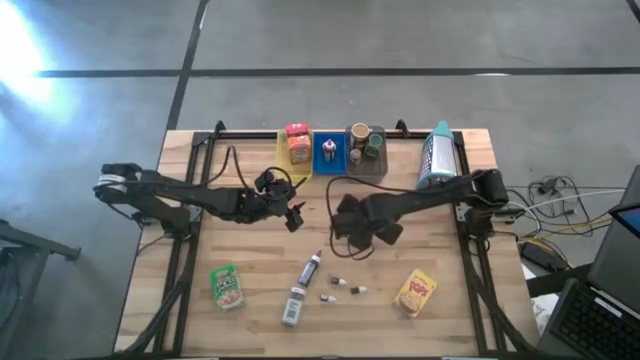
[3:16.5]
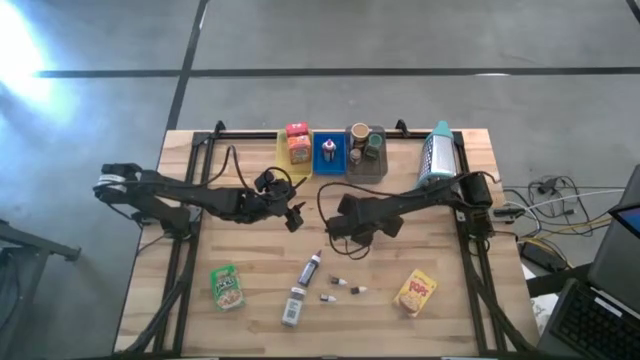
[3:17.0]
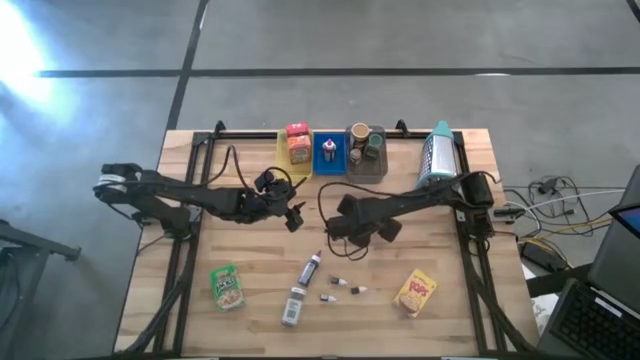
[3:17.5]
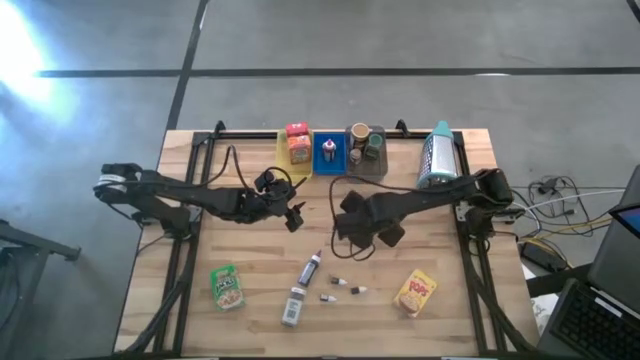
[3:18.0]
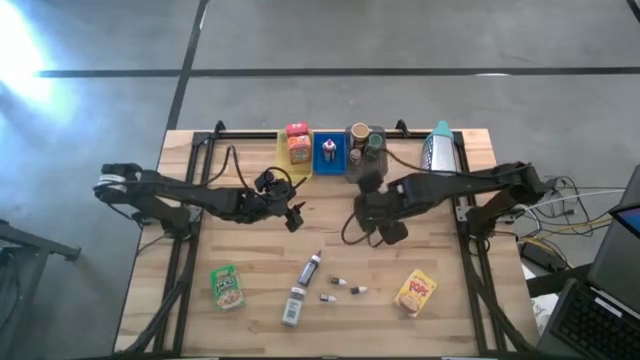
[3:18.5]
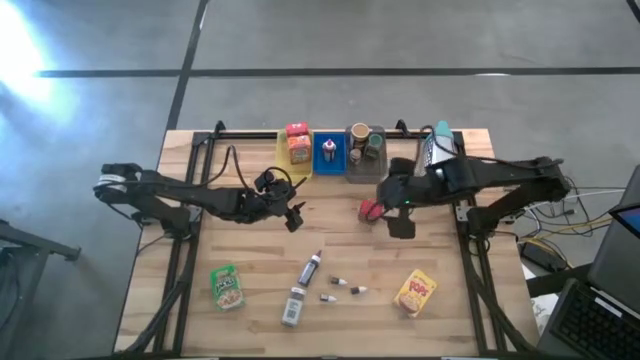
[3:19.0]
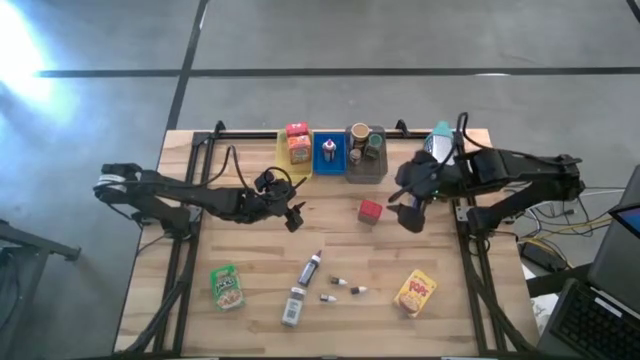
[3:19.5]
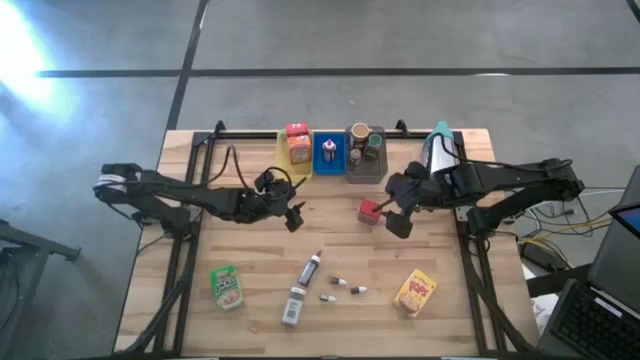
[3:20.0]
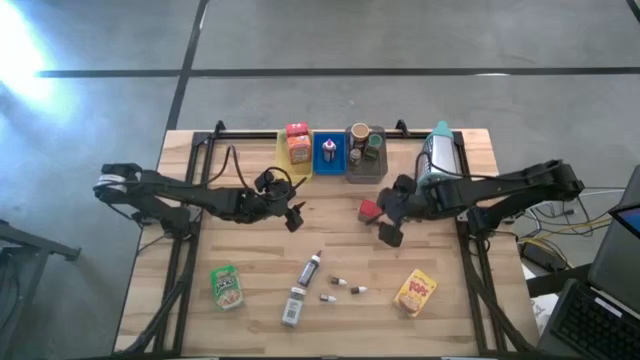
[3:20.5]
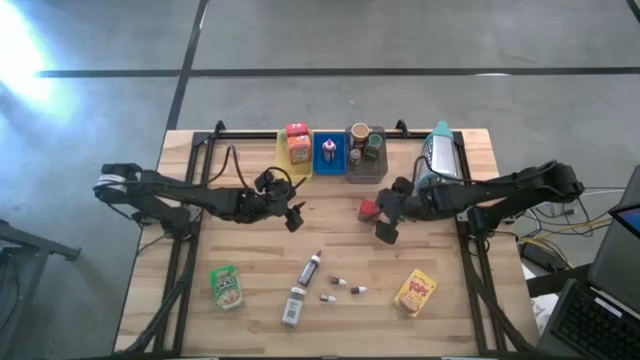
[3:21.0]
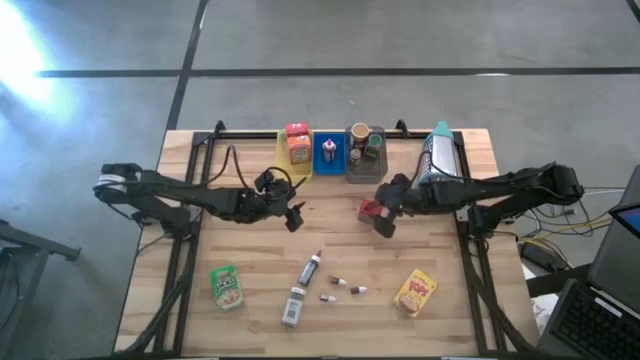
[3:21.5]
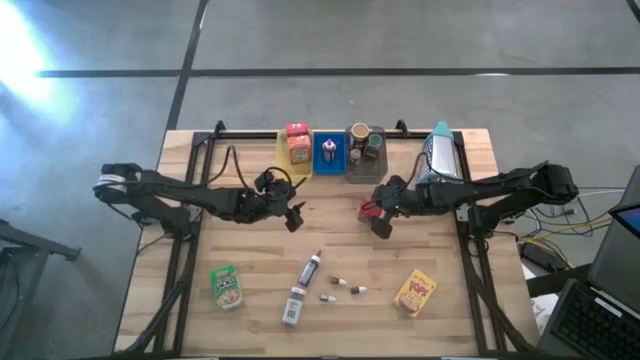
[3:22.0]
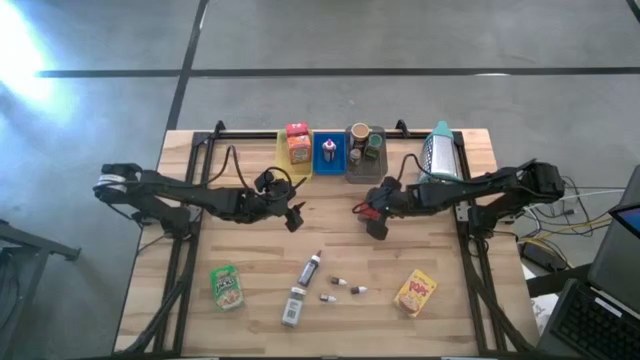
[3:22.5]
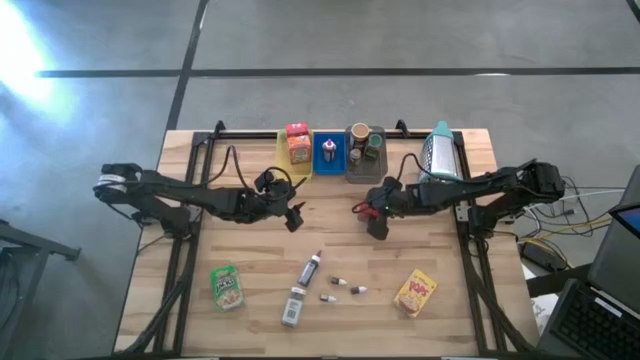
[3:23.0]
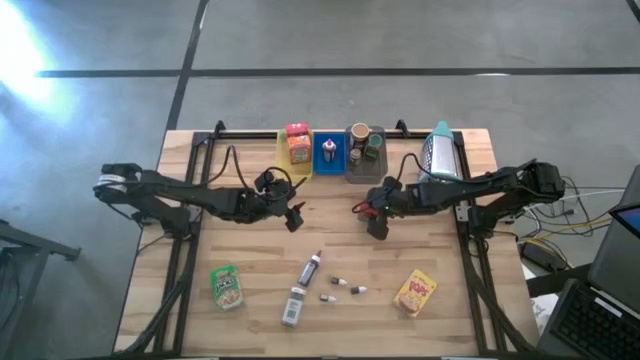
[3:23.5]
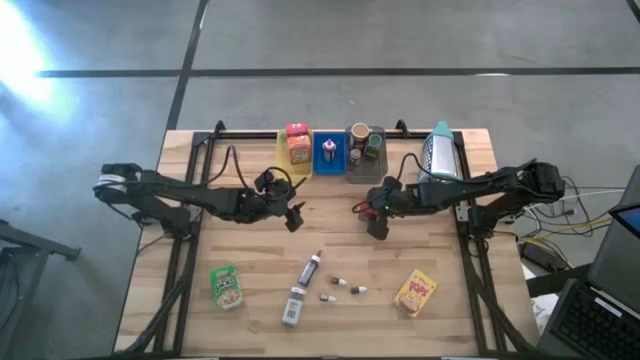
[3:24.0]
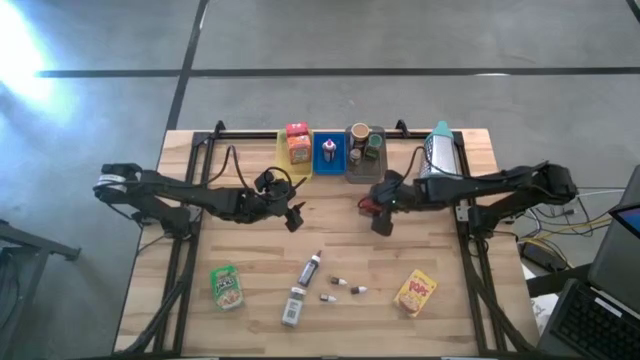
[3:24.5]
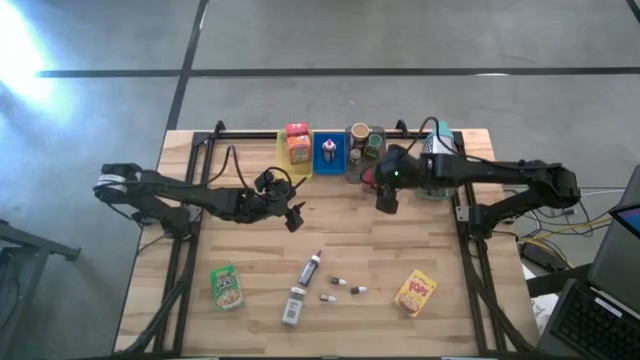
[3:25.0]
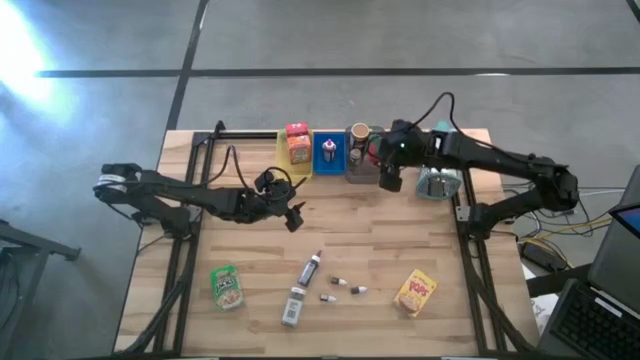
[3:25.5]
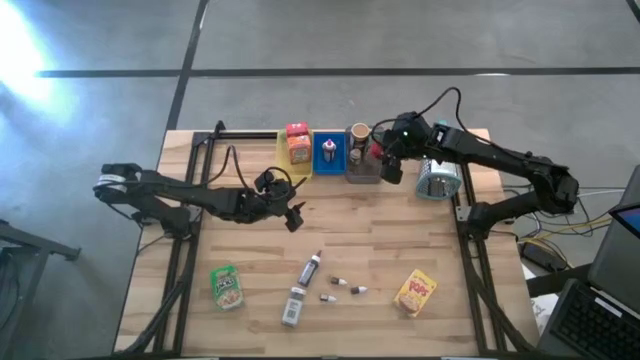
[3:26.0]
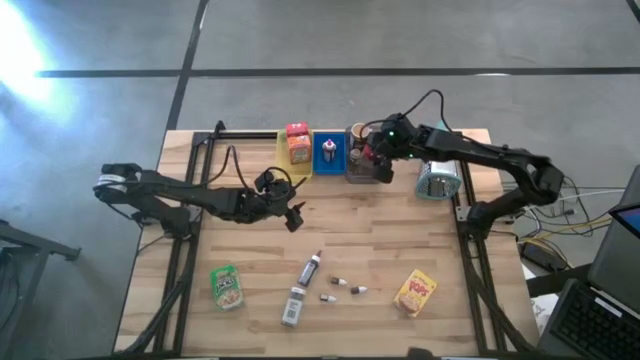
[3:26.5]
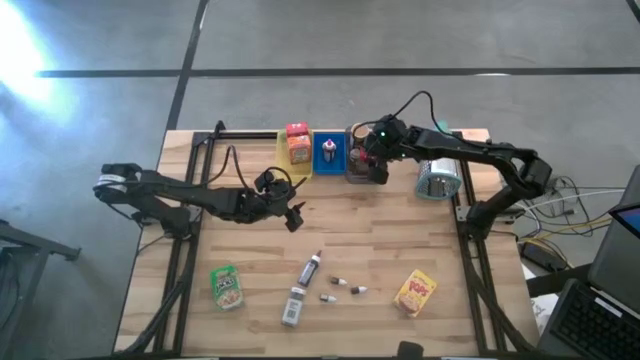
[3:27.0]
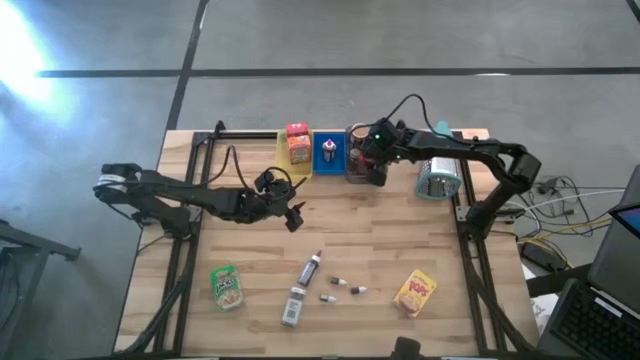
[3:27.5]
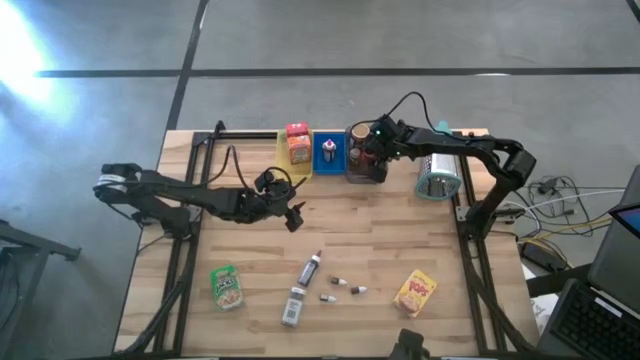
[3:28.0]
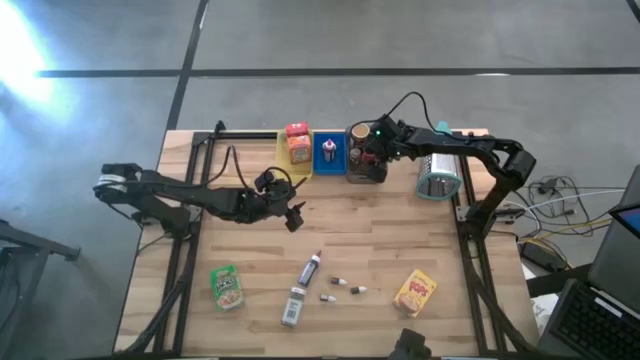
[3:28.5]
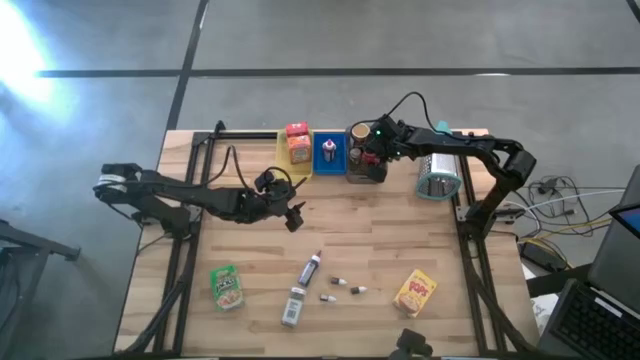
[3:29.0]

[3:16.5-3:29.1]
Task: Pick & Place Kitchen Items
Put the red seasoning can into the black bin

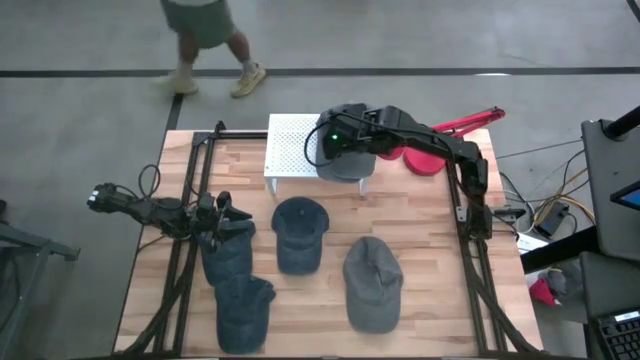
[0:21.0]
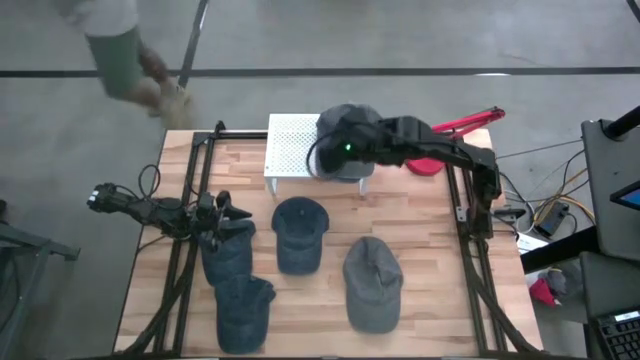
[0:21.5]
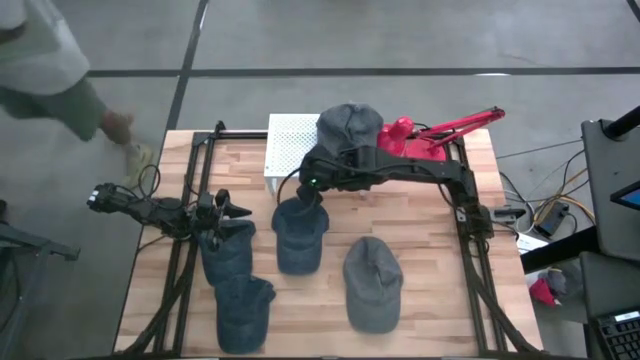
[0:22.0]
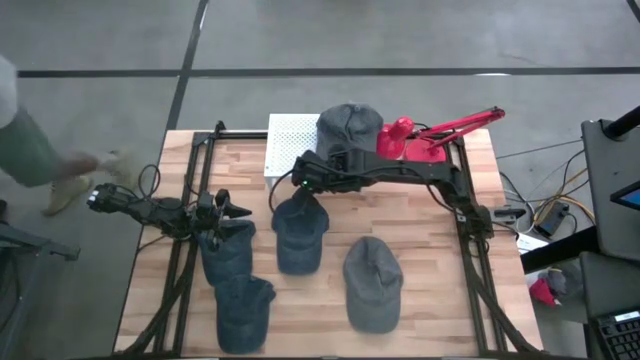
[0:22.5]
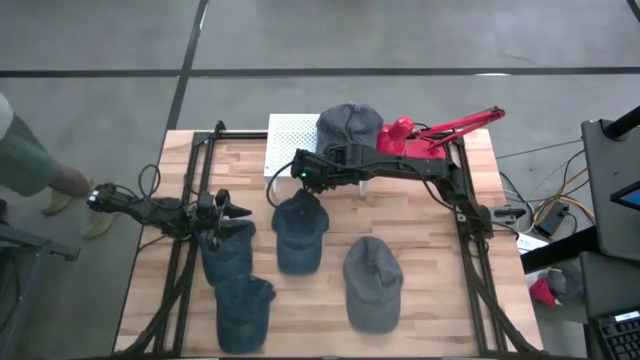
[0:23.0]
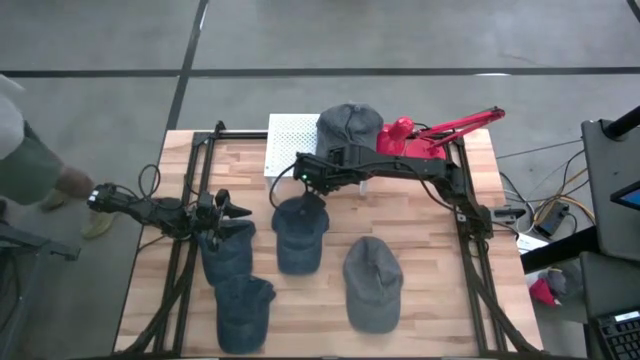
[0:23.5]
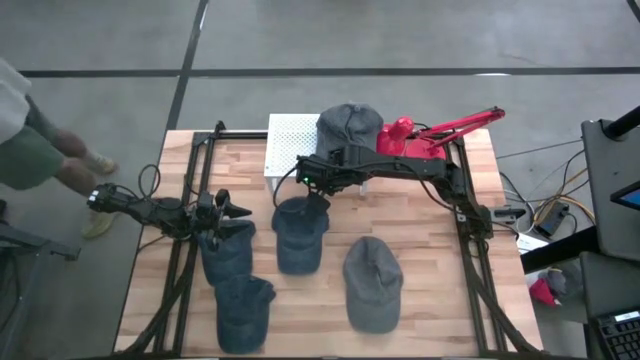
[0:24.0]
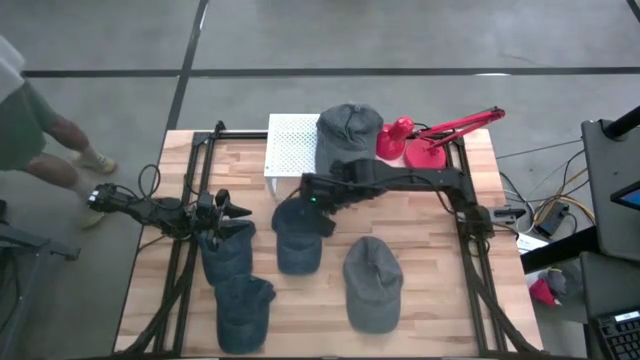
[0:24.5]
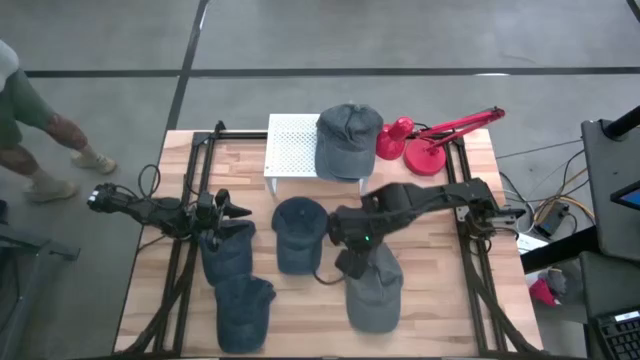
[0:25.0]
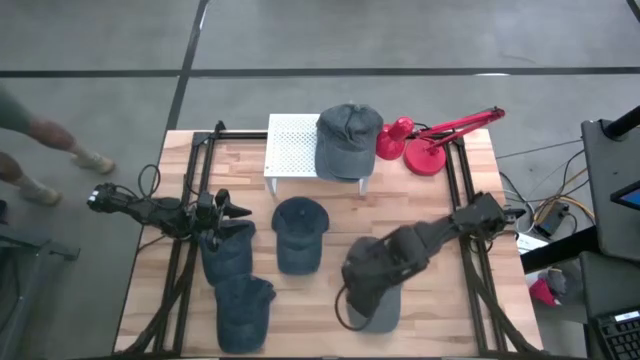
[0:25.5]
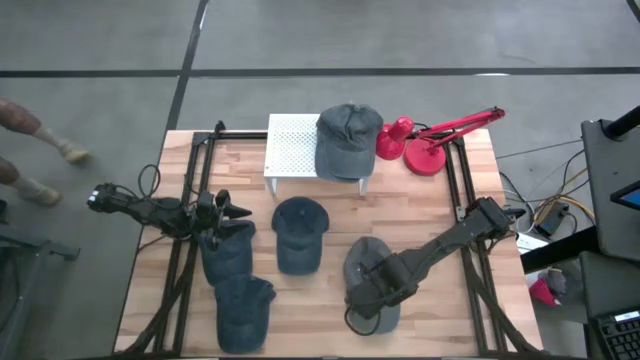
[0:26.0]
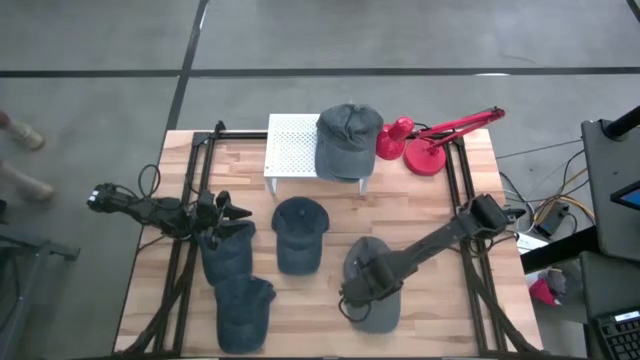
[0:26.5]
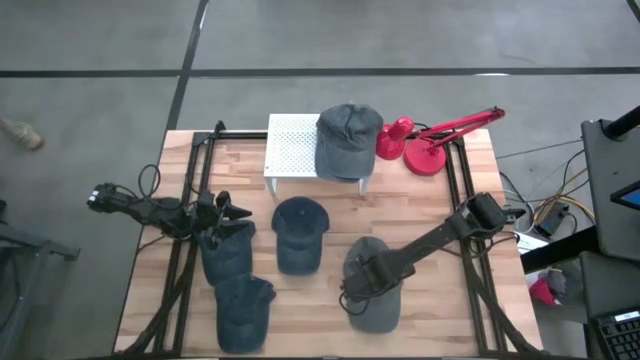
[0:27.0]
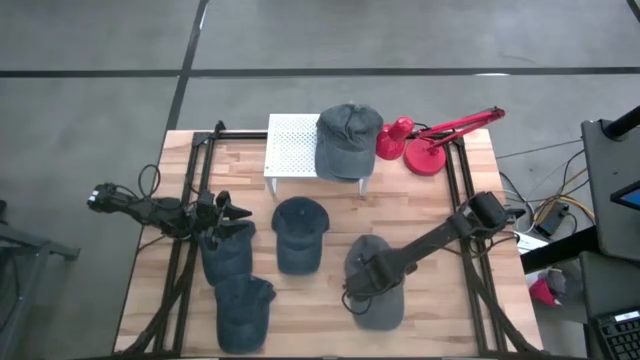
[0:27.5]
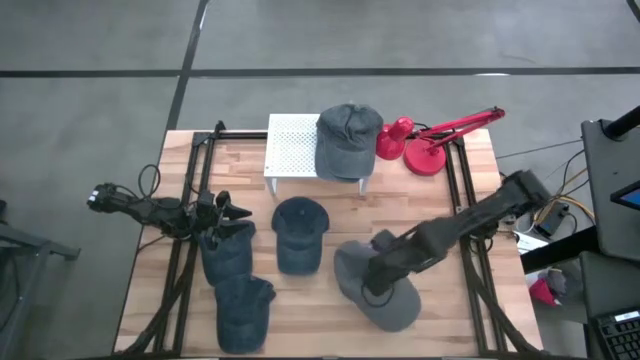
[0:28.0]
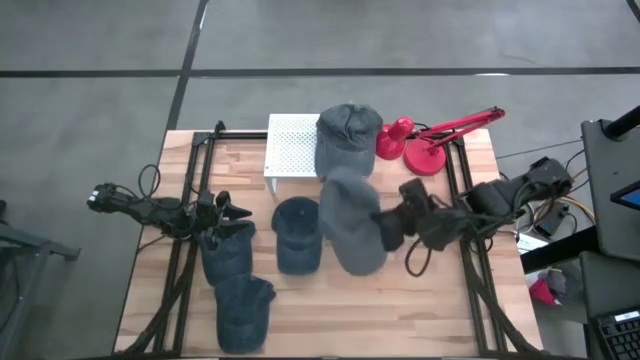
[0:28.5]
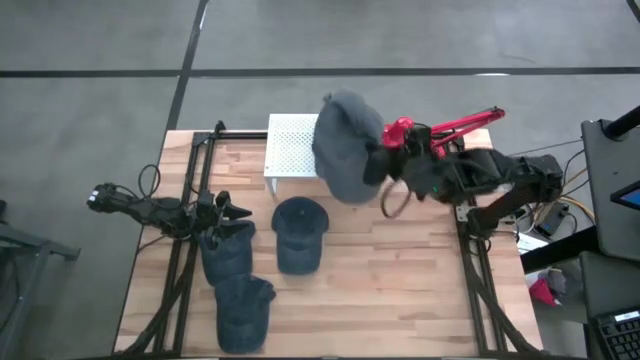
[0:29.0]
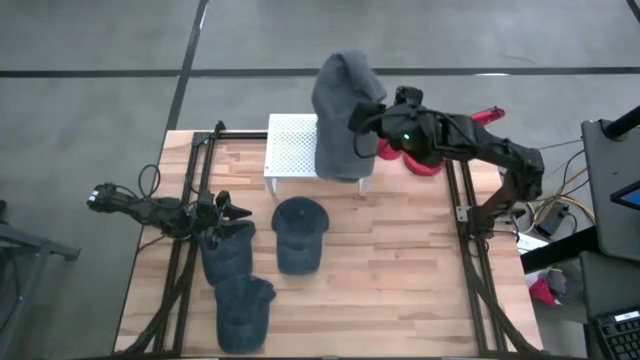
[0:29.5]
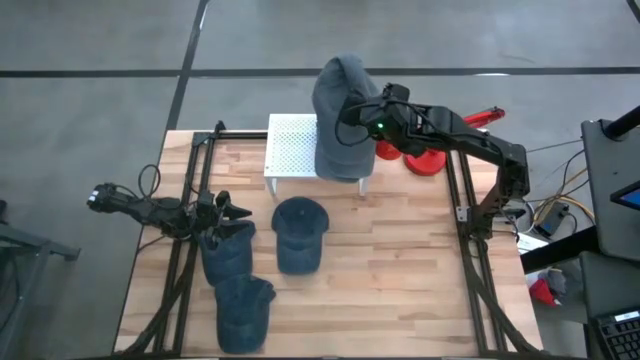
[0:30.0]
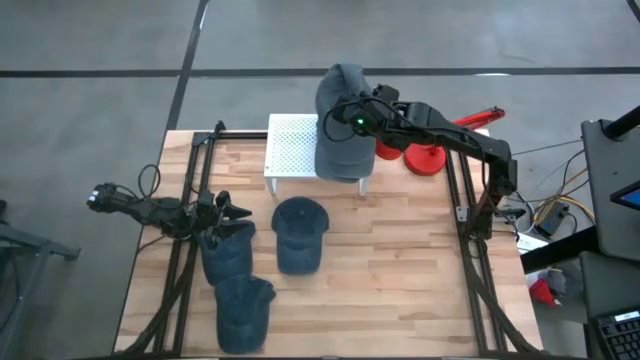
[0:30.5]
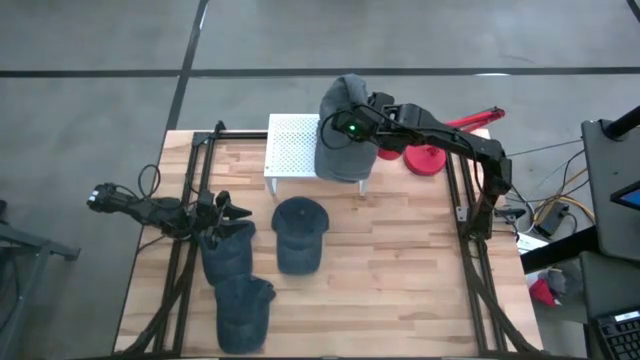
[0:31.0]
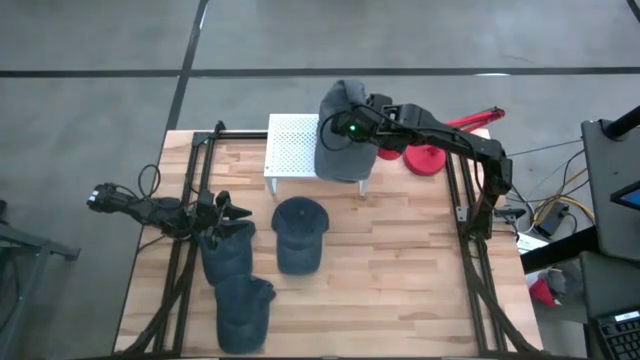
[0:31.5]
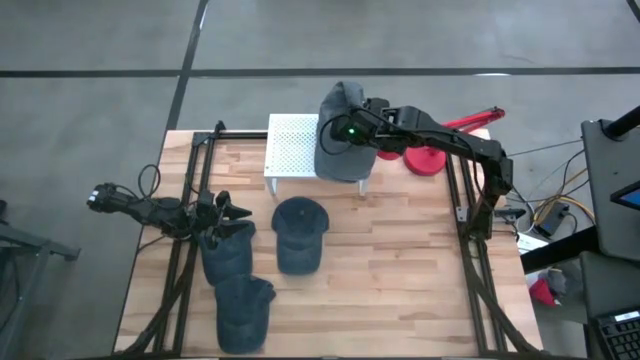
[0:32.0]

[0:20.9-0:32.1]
Task: Pick & Place hat
Put the gray cap on top of the gray cap on the shelf
